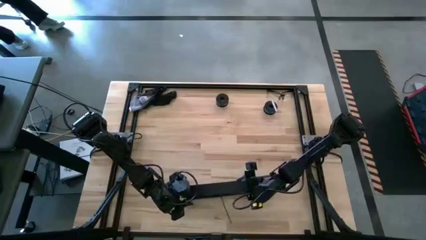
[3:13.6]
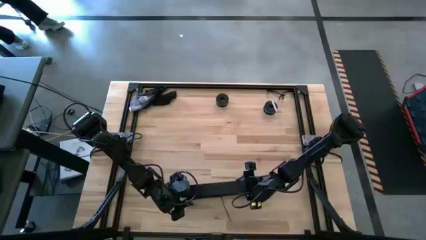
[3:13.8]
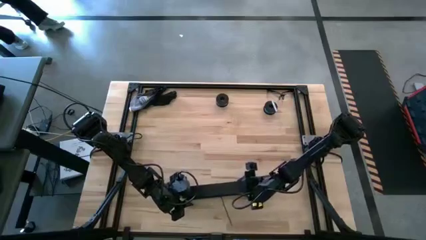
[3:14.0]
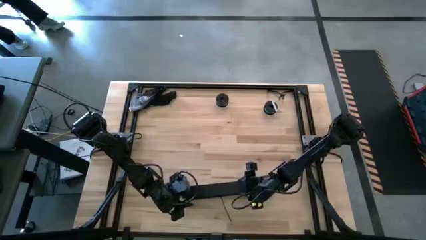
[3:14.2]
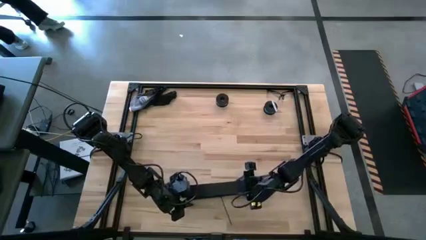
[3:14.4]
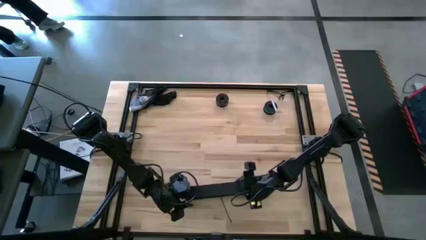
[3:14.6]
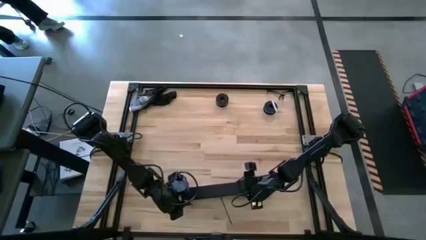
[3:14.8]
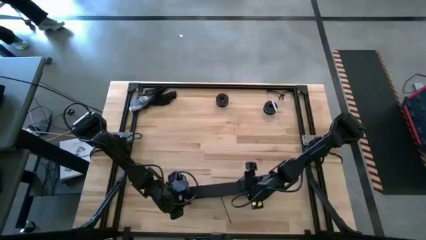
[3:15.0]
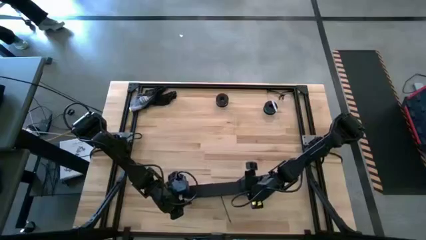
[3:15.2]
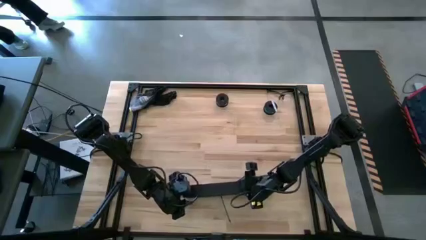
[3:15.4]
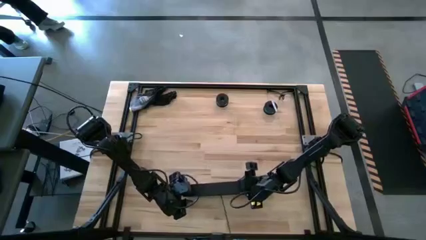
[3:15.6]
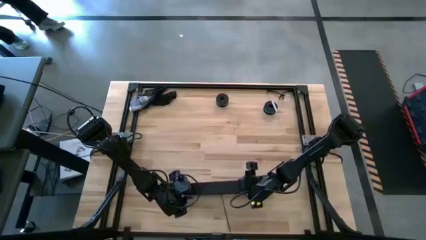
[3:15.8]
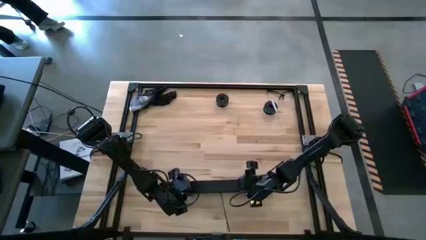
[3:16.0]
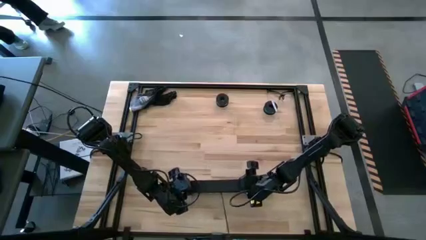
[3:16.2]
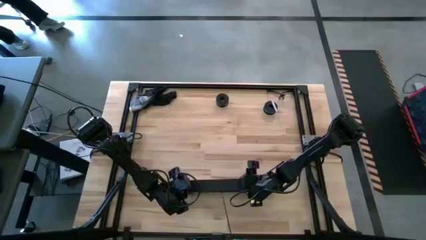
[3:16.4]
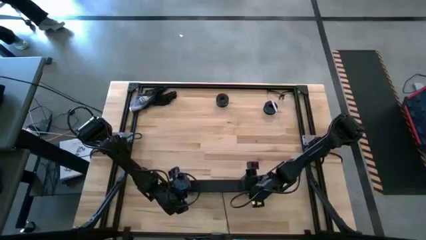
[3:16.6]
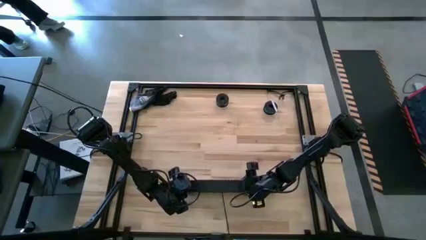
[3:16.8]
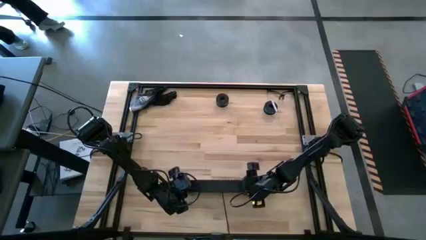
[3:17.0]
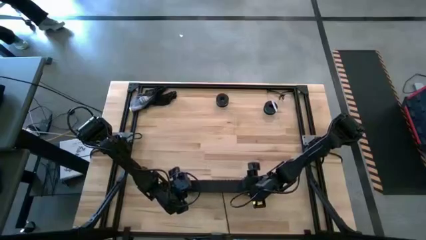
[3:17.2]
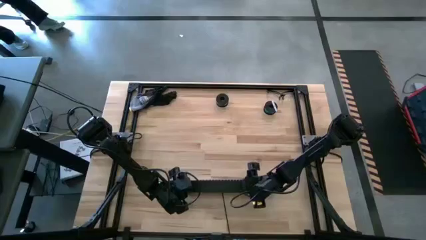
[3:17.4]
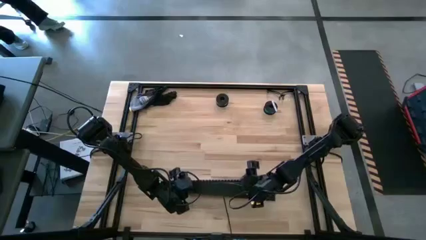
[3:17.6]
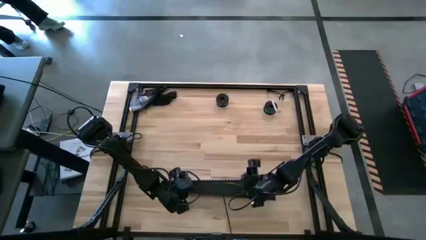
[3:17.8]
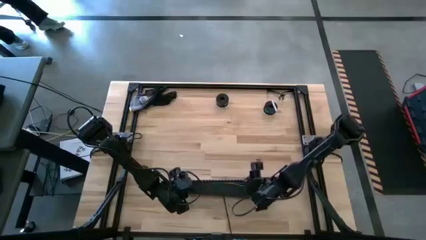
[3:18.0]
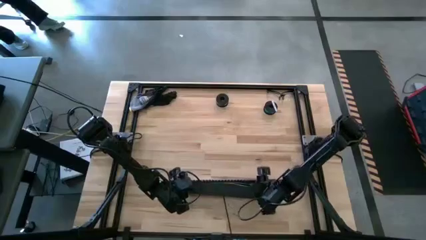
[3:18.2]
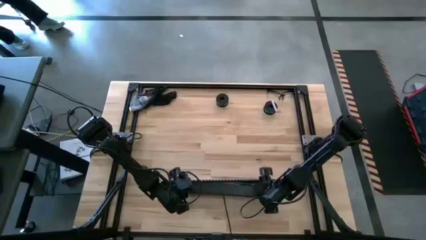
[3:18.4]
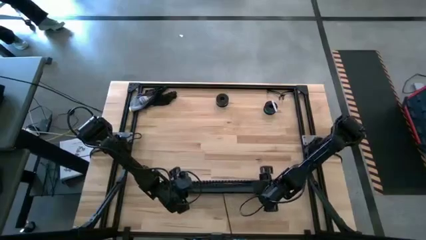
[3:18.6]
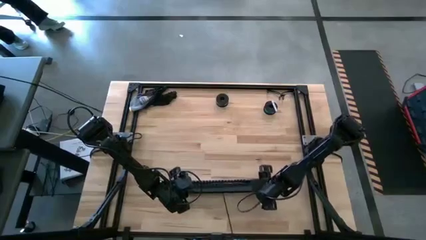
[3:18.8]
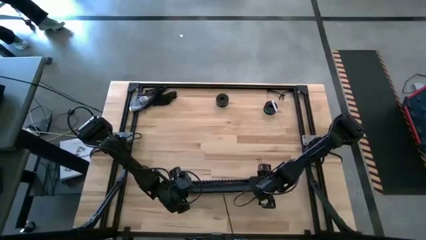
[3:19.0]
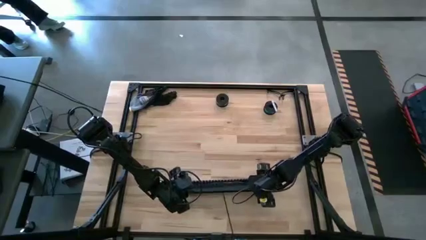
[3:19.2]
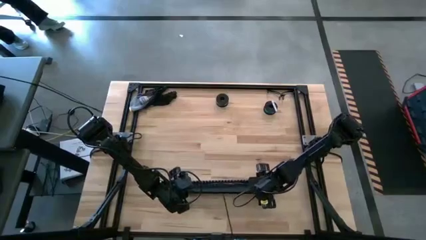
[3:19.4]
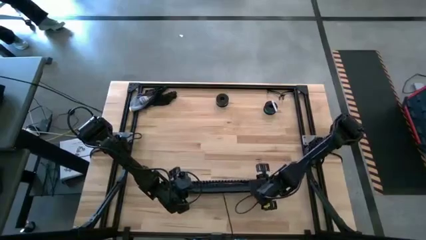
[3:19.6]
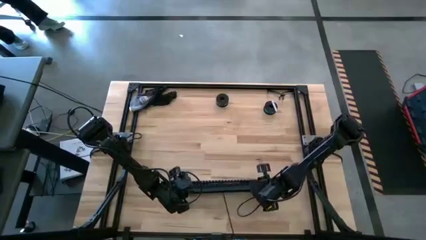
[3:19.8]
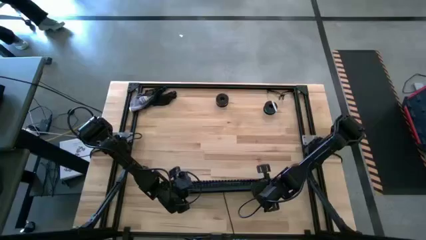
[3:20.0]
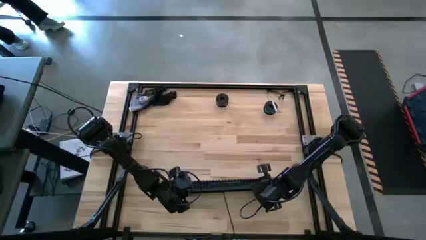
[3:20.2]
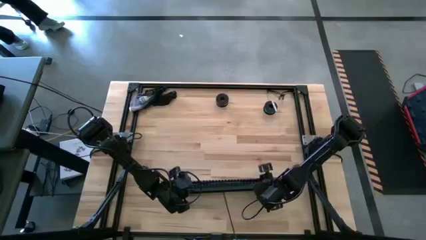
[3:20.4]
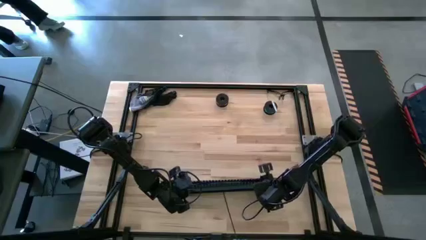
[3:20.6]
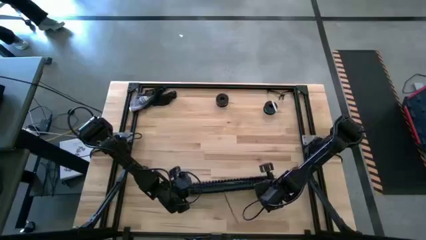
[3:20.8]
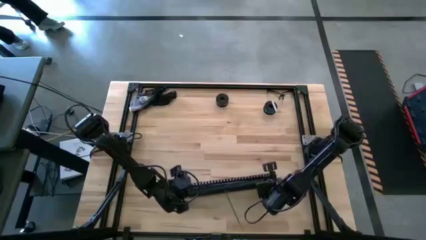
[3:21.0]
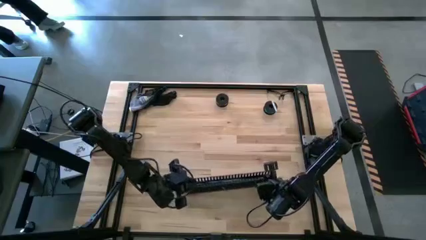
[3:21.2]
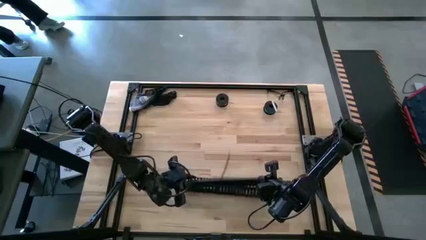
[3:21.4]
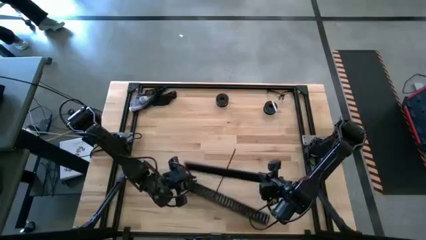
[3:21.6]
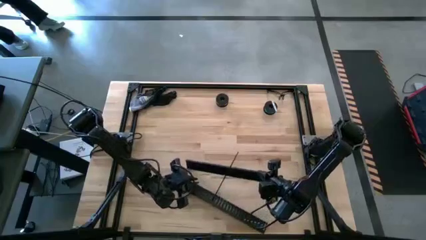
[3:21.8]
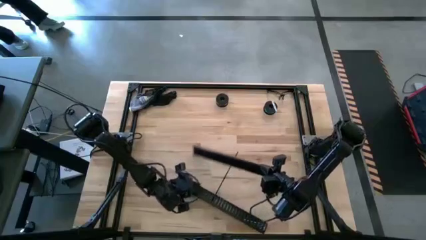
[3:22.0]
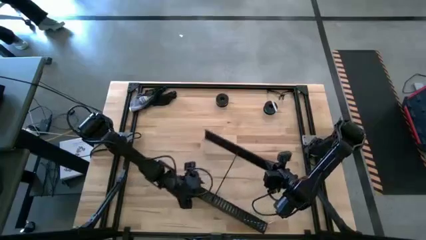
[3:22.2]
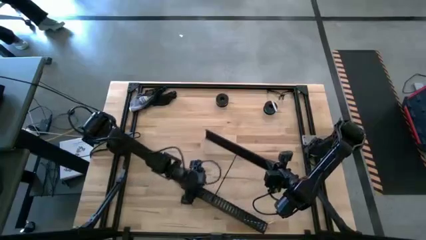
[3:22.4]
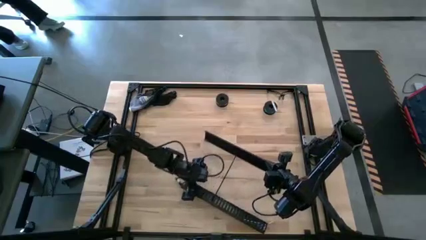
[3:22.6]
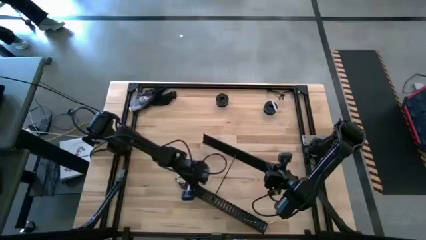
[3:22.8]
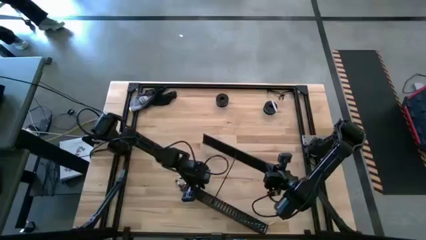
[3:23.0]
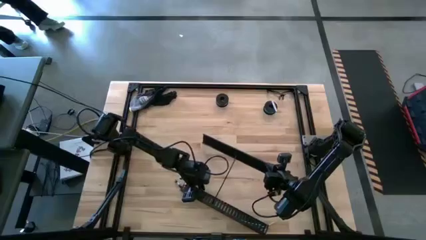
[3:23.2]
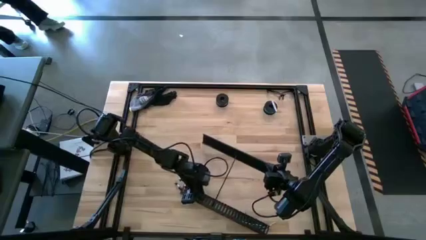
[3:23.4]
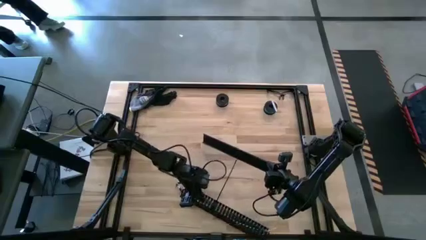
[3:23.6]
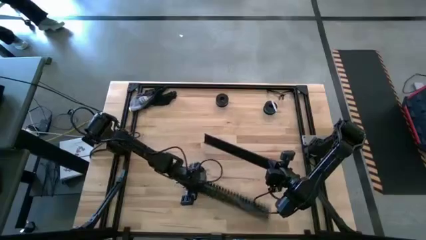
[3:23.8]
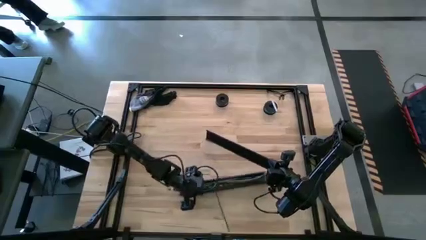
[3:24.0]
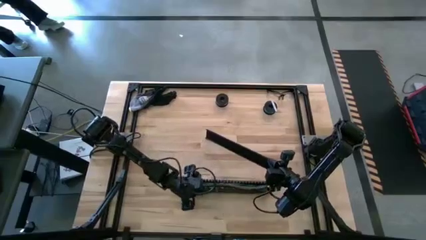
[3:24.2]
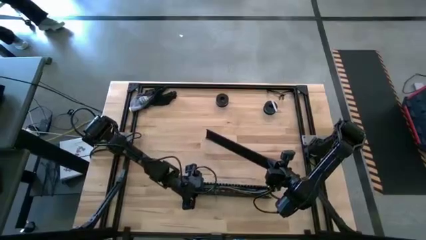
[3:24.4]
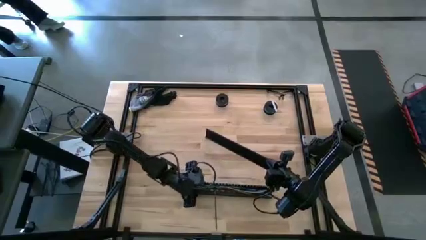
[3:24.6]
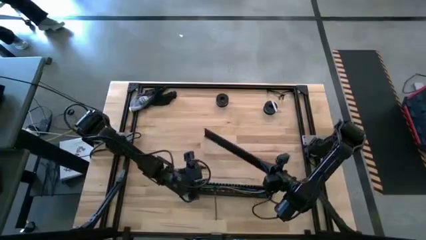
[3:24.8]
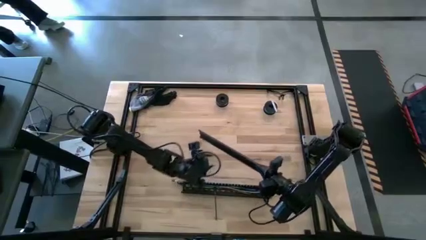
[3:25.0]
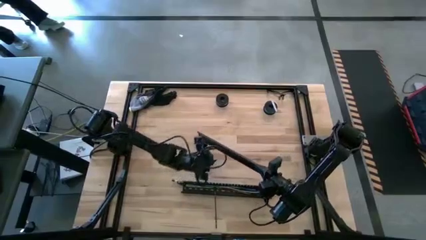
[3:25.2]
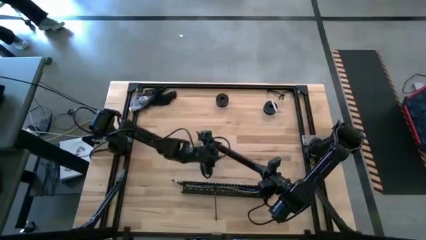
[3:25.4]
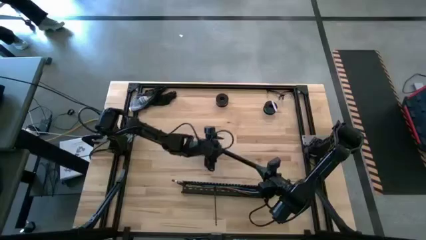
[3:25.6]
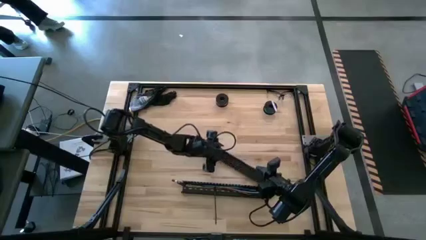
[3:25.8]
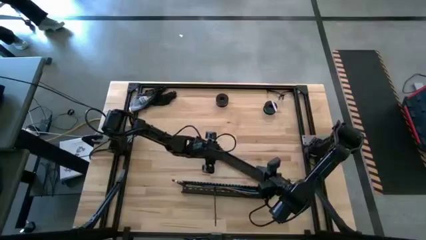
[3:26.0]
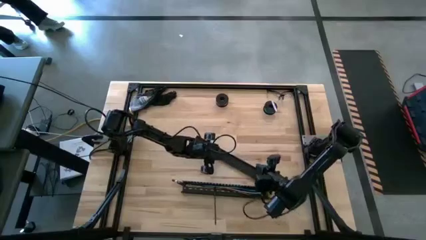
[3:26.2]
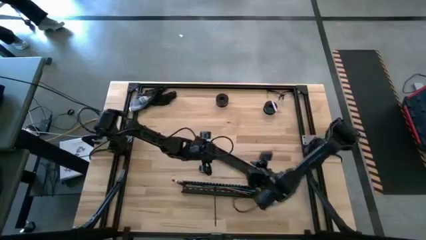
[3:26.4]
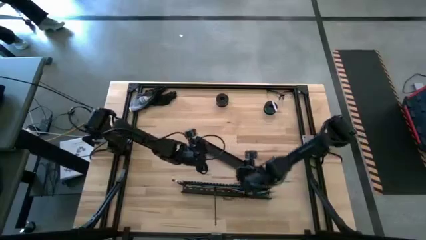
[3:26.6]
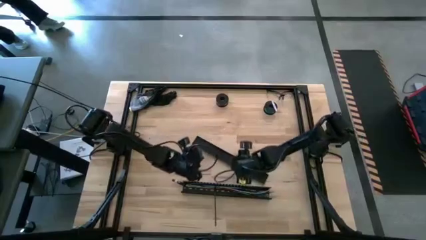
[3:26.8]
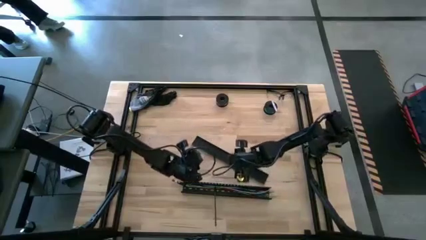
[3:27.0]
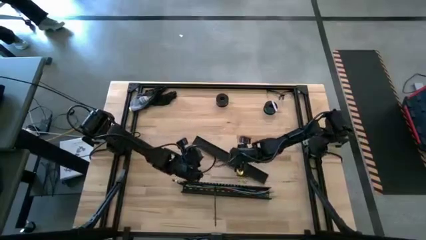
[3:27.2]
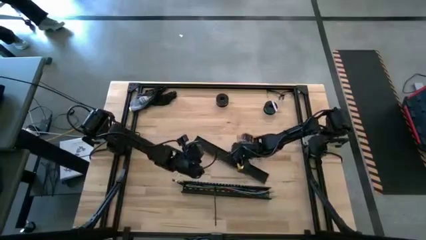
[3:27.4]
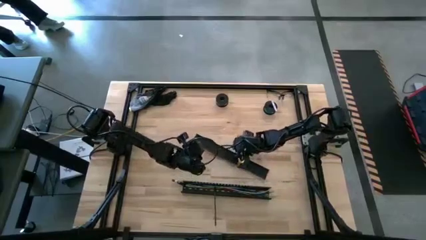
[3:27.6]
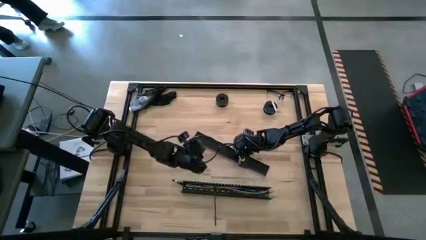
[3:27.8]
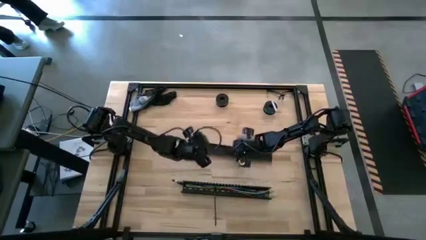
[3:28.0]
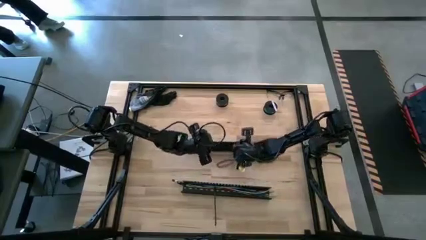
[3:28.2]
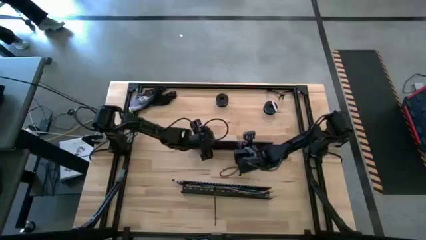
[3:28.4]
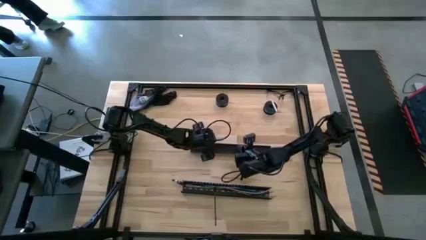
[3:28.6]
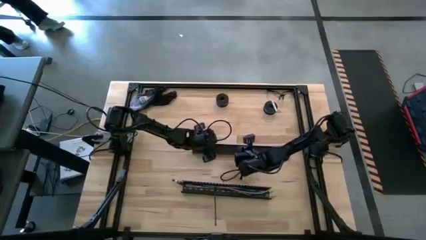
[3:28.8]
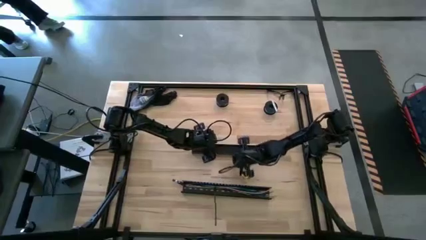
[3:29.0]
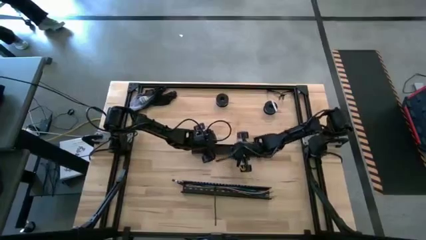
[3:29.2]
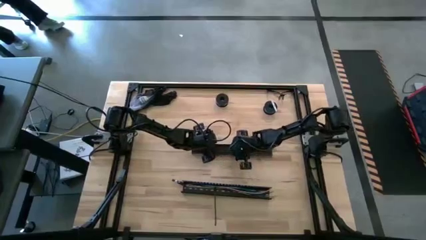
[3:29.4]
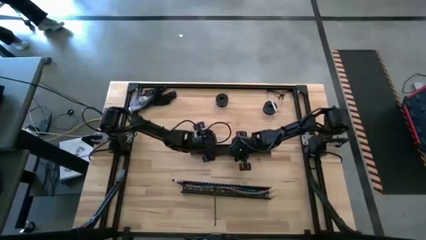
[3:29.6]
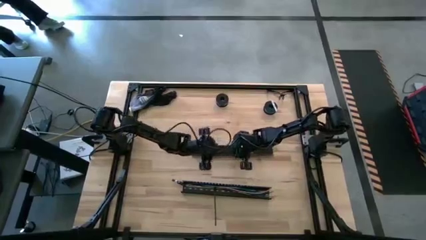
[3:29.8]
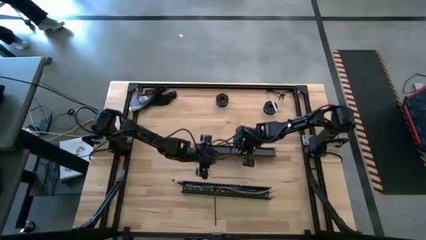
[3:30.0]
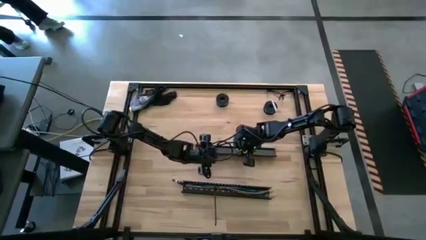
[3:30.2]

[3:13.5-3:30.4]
Task: Ziptie cables
Close the black cable duct
